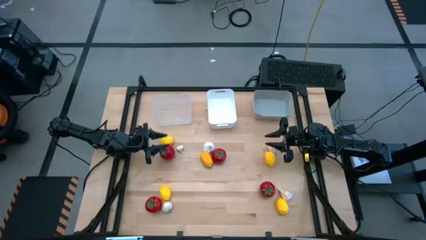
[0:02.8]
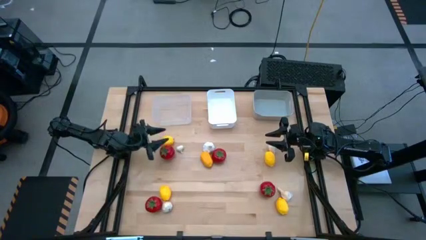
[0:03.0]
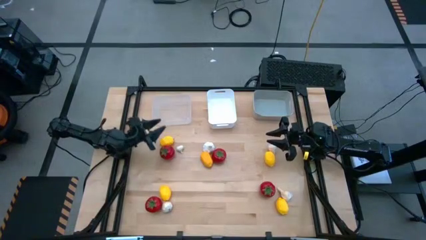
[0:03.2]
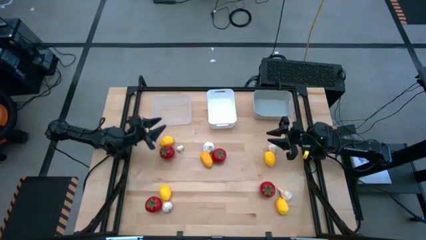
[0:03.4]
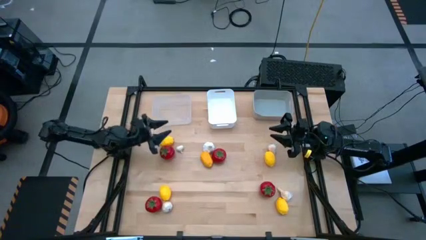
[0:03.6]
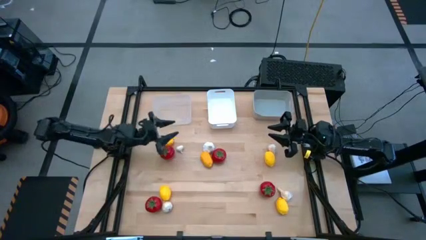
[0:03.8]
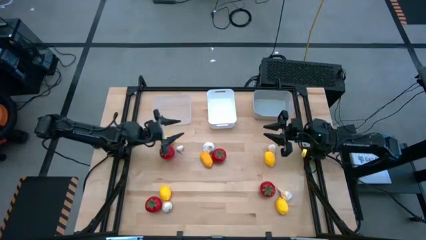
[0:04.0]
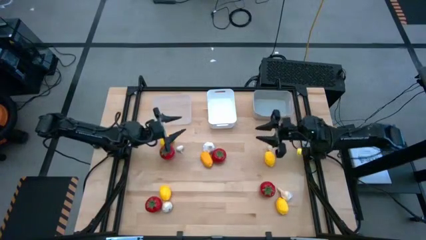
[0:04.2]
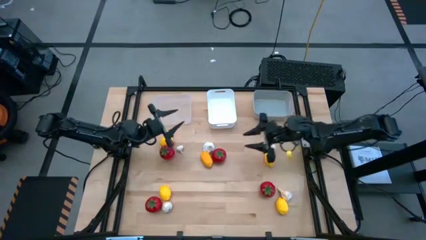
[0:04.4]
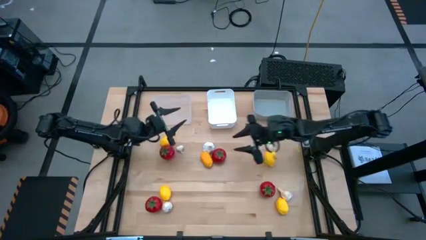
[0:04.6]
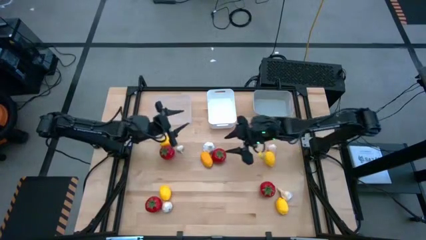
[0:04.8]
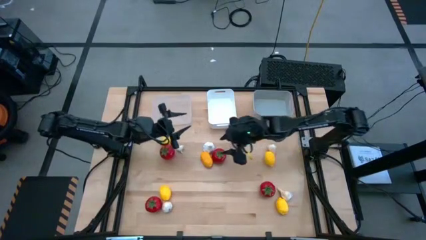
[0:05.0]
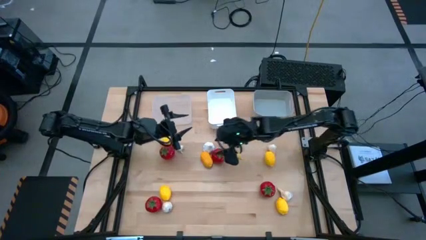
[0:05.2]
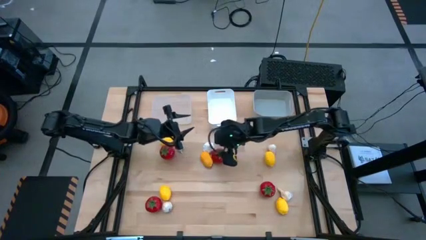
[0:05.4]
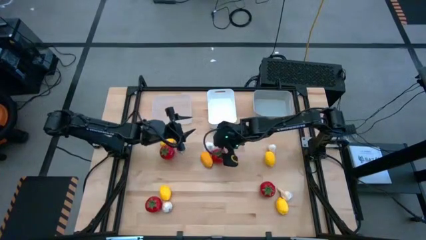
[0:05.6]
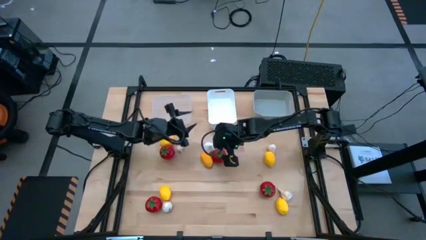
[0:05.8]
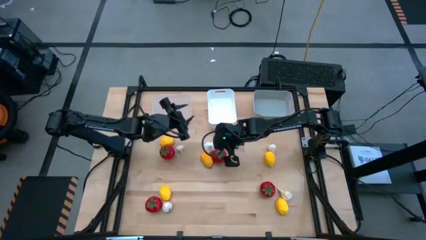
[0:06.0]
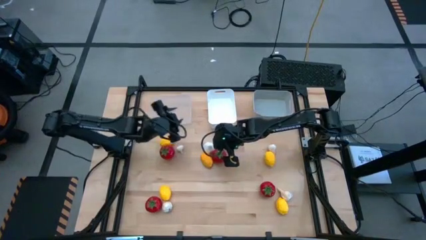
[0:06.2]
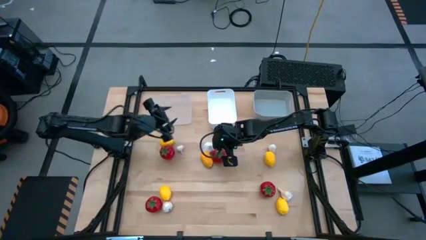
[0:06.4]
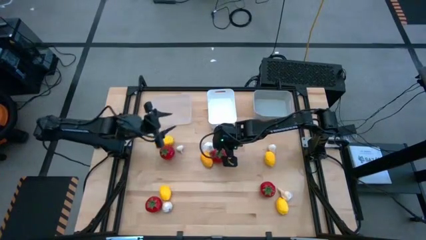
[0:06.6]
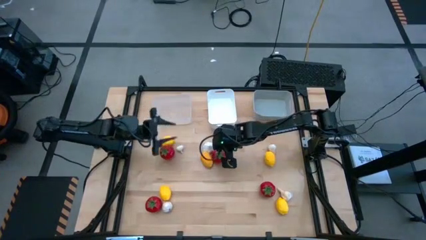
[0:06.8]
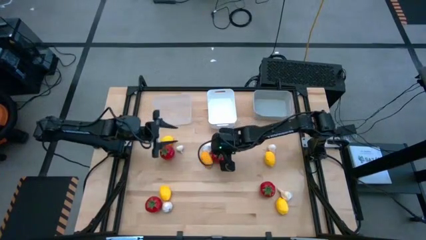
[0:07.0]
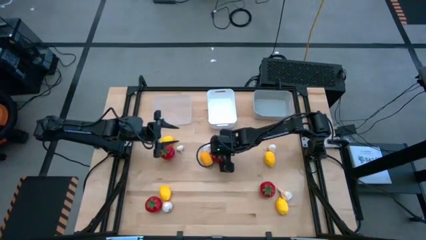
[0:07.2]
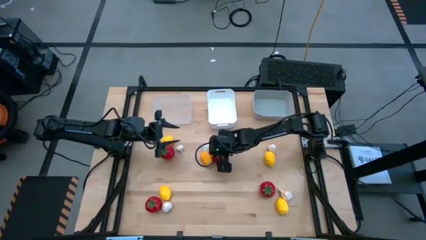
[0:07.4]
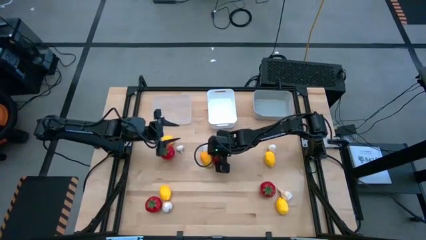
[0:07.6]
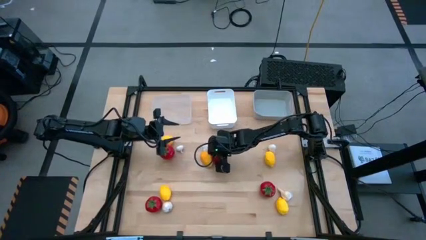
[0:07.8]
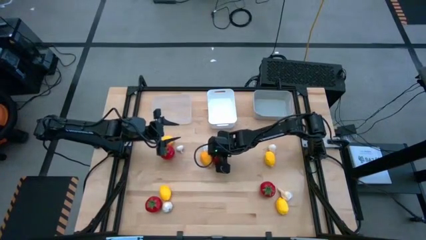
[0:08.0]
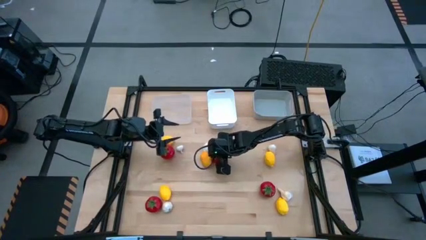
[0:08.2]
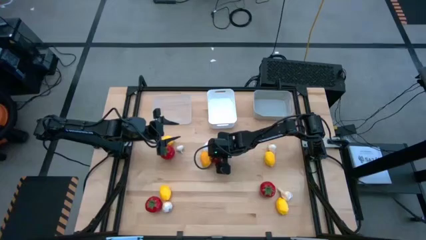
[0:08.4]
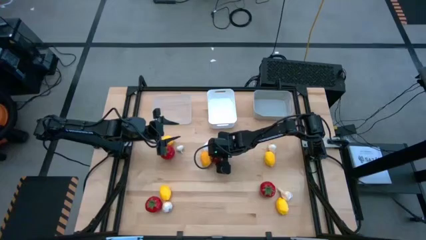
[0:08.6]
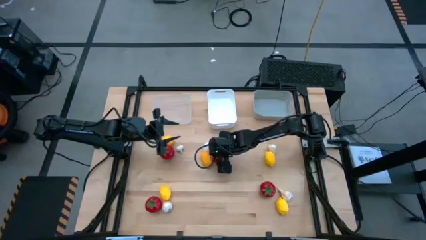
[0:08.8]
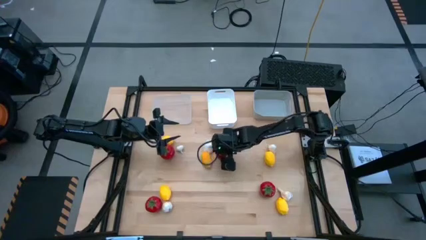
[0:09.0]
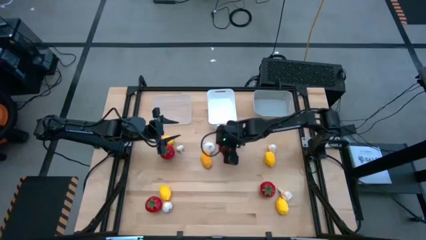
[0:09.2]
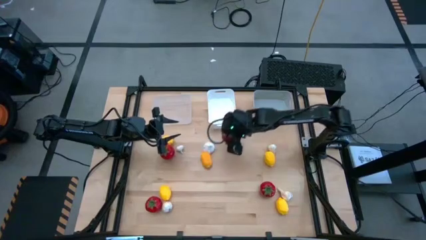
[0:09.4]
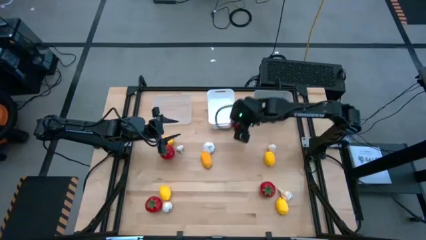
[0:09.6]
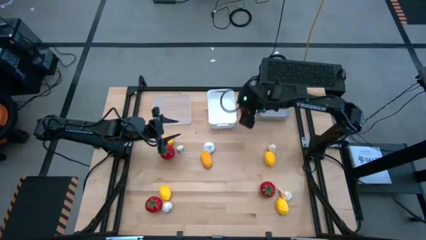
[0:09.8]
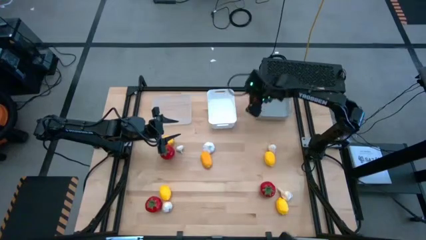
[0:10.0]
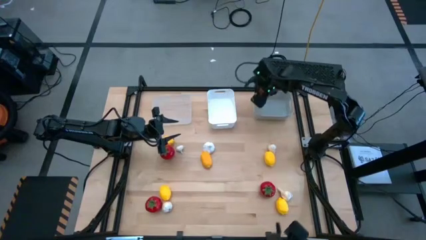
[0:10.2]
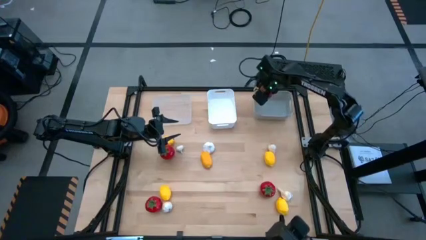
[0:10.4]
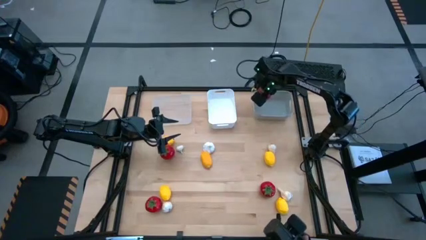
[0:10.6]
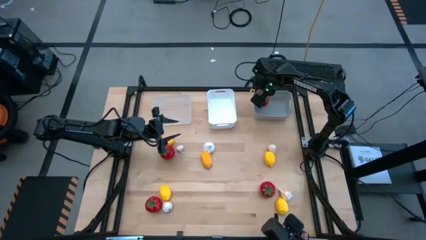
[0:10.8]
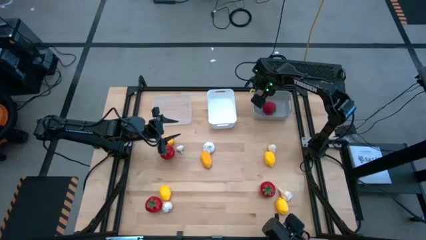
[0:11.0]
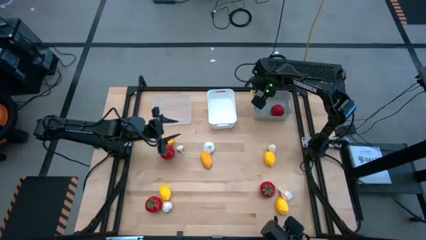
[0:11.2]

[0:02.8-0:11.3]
Task: Sort produce into baskets
Put the red tomato into the gray bin

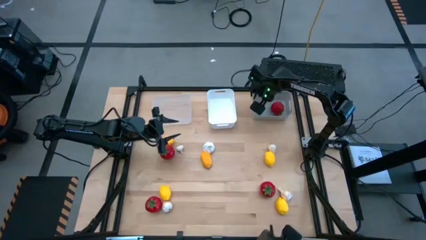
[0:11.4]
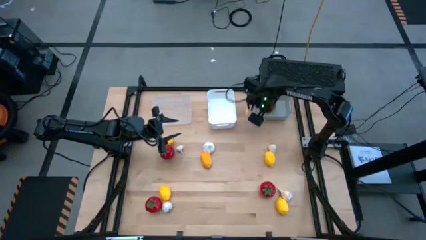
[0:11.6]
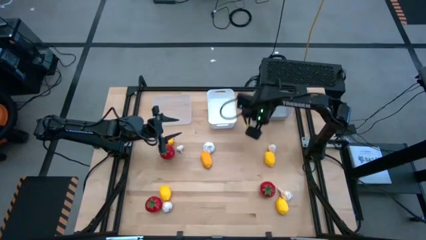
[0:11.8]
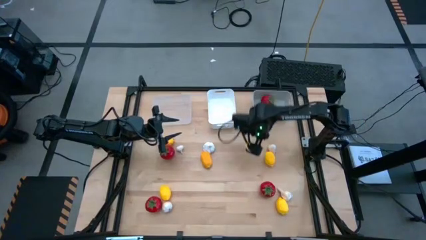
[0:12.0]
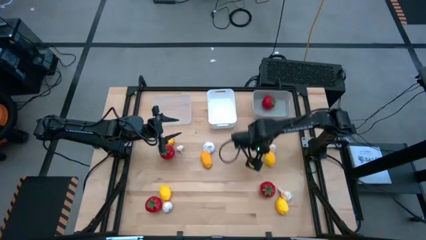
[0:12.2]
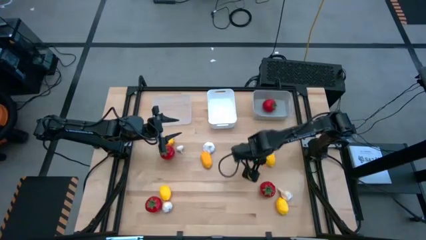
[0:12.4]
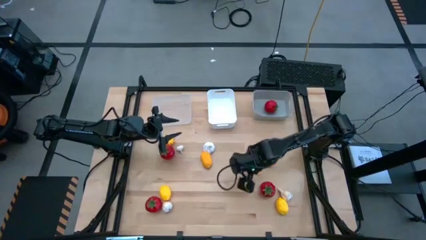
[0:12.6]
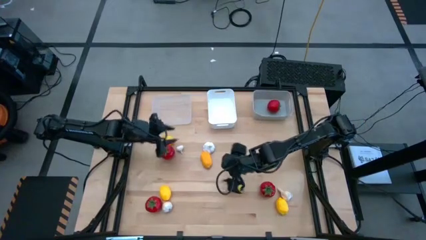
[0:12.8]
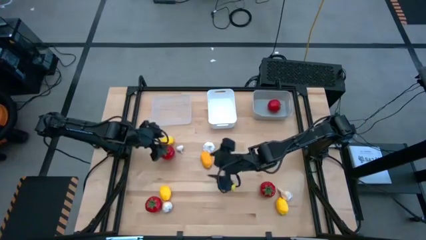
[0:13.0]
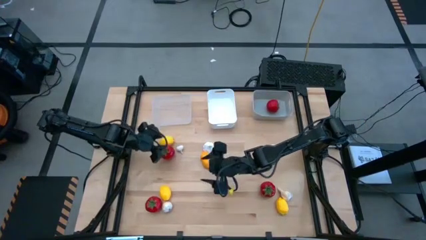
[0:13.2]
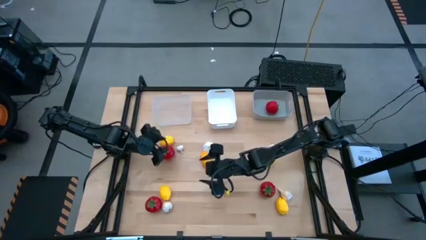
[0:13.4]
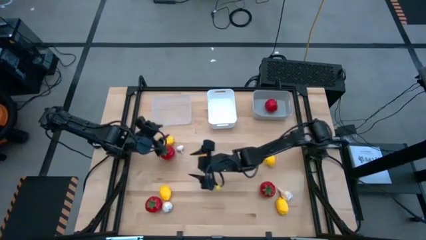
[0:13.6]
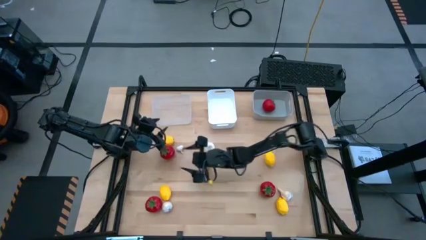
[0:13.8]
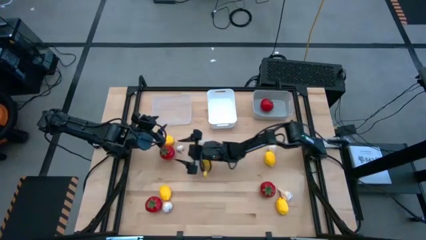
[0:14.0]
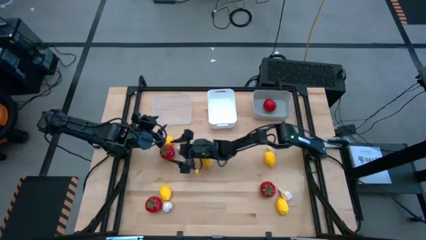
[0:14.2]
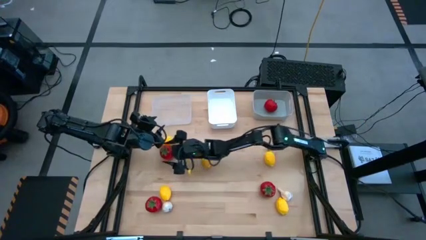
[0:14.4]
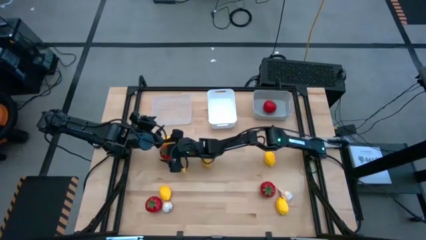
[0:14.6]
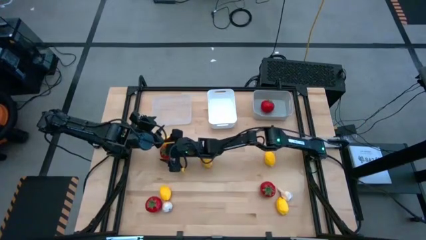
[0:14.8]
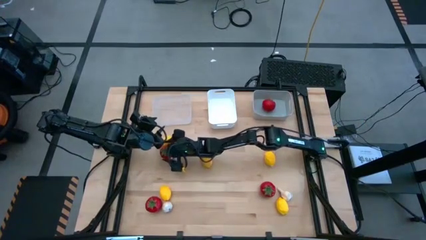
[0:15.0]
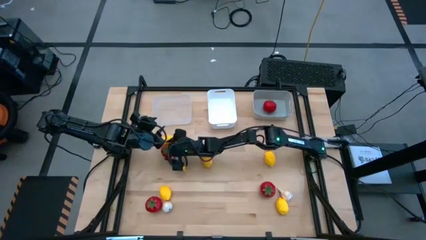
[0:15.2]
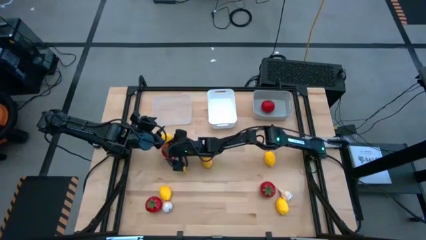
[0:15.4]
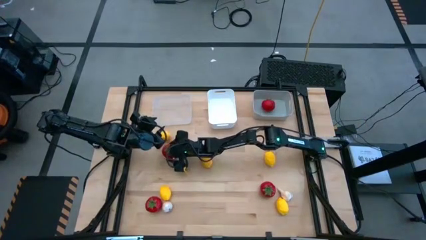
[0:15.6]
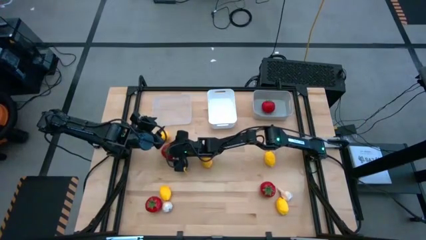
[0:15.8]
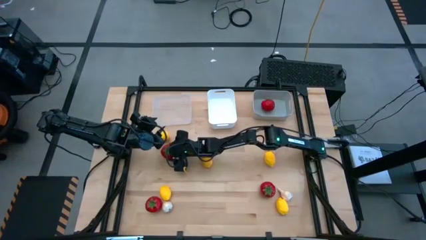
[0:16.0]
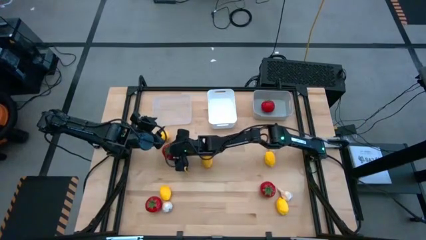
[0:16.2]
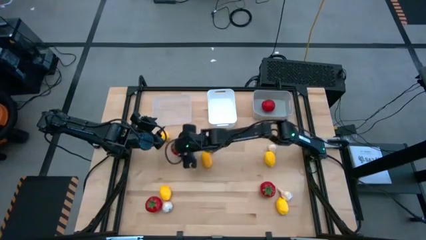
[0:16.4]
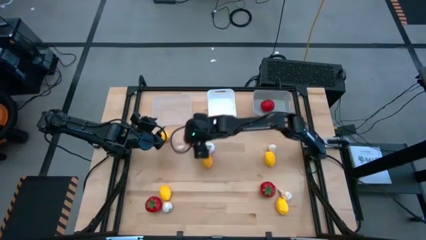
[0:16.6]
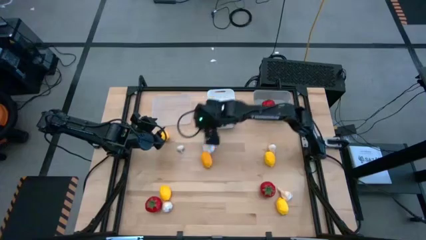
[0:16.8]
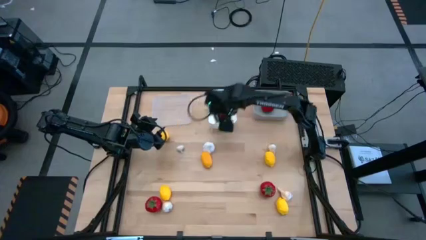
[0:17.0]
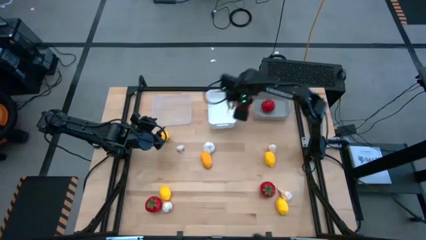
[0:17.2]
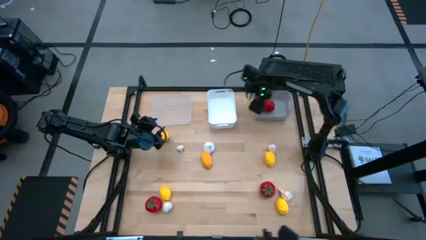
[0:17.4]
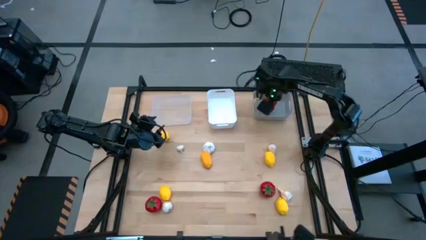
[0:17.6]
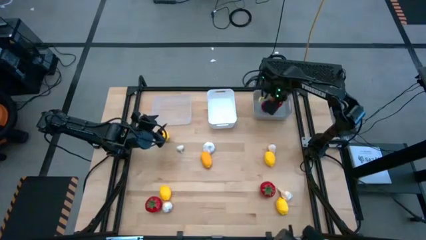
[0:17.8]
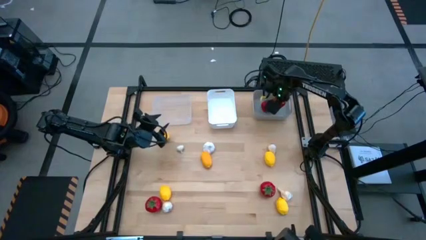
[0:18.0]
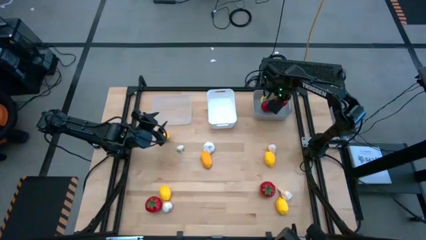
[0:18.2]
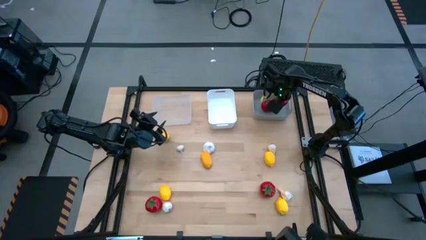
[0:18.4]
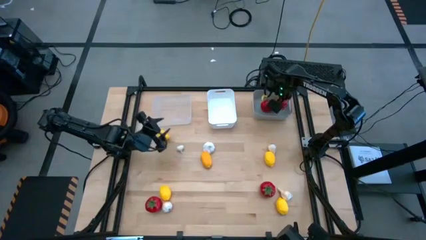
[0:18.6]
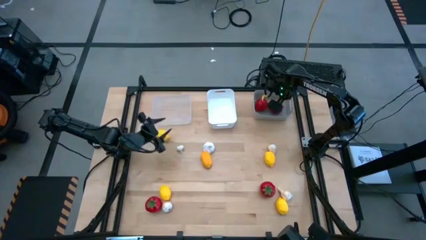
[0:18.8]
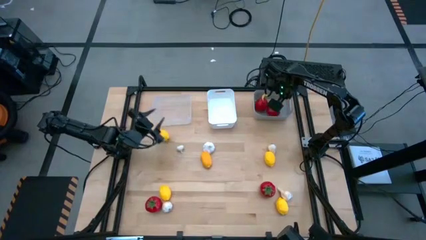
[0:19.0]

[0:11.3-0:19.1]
Put the red tomato into the gray bin
